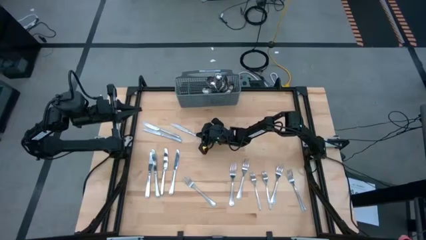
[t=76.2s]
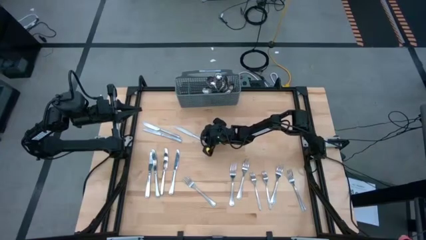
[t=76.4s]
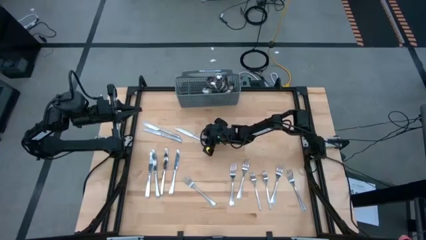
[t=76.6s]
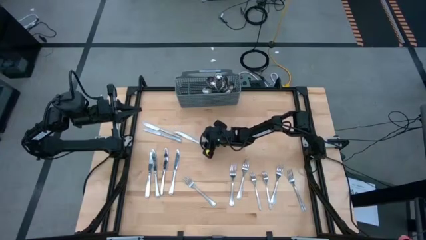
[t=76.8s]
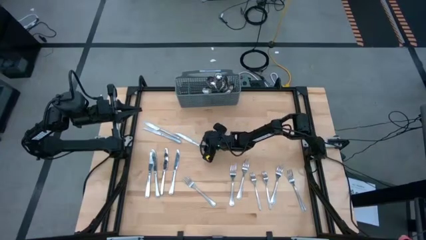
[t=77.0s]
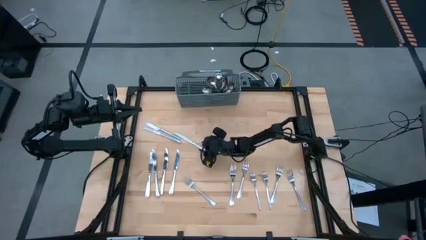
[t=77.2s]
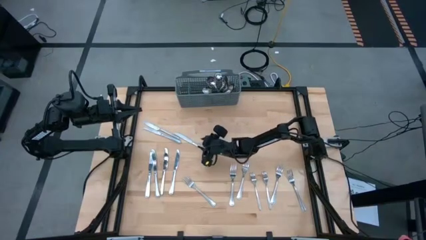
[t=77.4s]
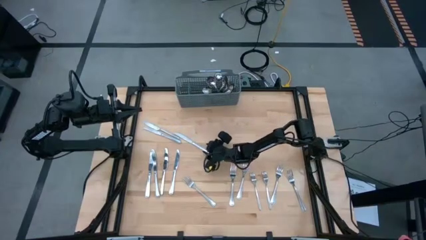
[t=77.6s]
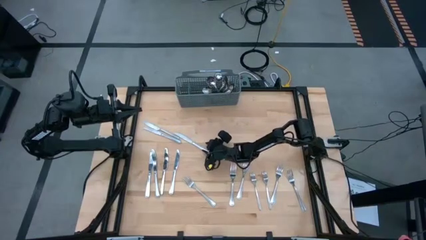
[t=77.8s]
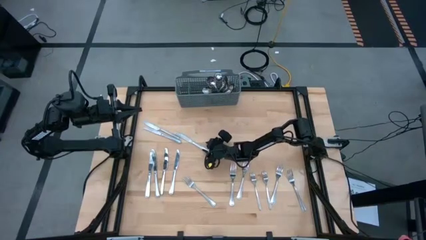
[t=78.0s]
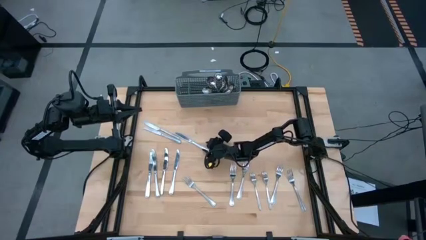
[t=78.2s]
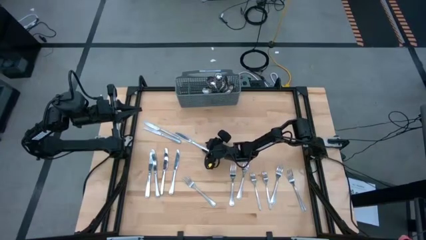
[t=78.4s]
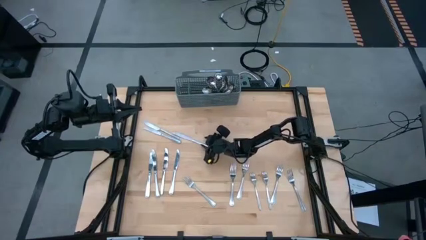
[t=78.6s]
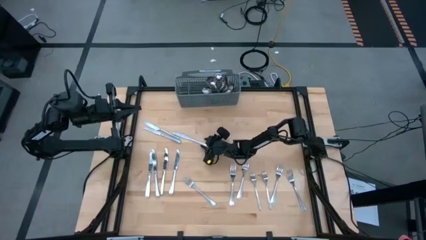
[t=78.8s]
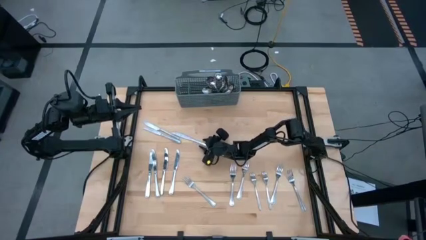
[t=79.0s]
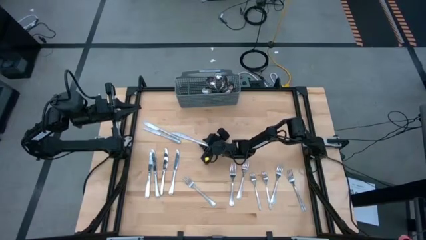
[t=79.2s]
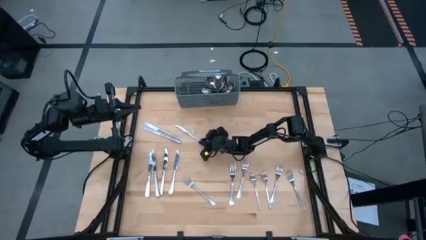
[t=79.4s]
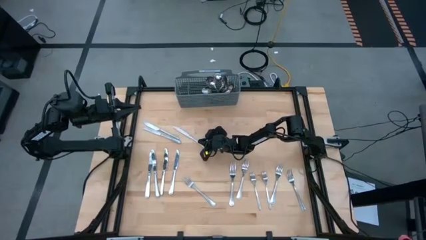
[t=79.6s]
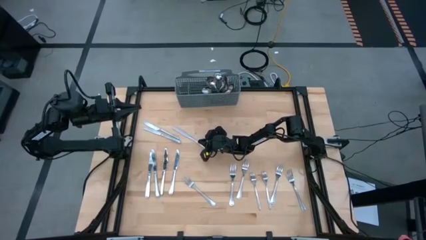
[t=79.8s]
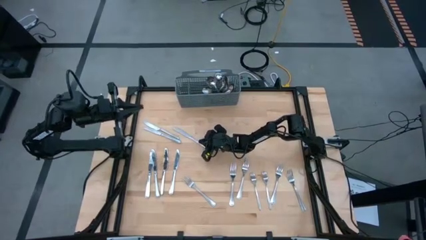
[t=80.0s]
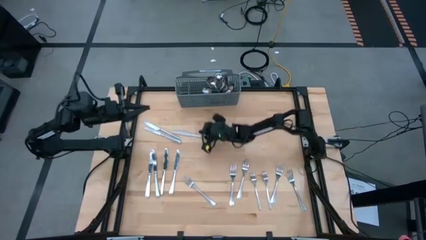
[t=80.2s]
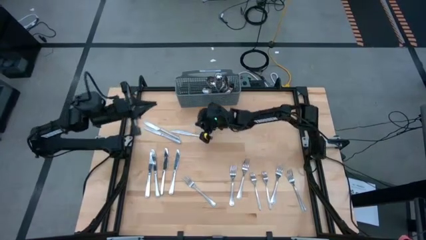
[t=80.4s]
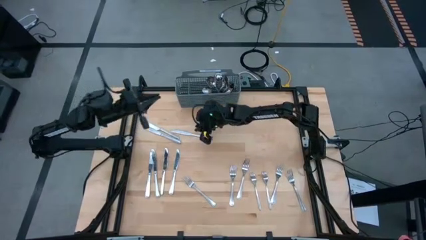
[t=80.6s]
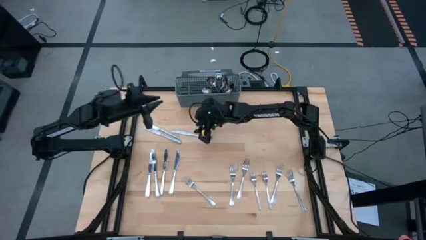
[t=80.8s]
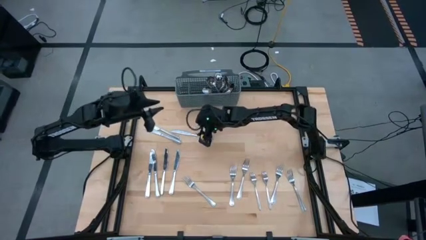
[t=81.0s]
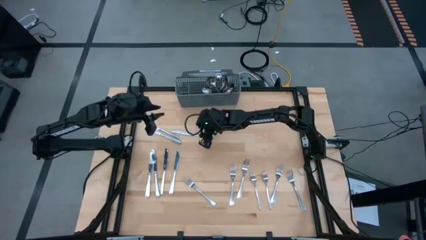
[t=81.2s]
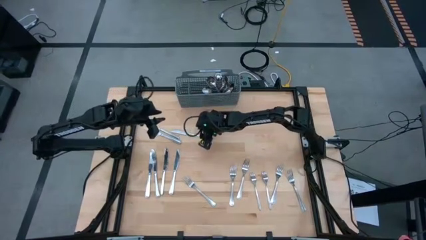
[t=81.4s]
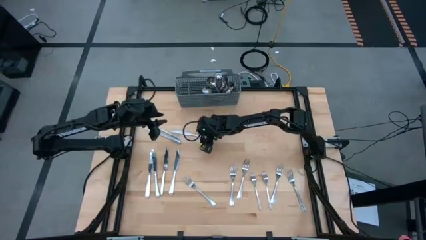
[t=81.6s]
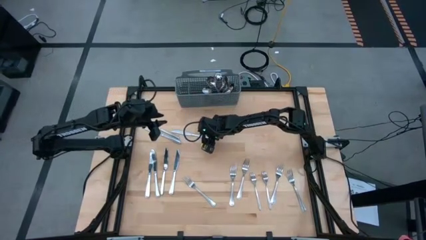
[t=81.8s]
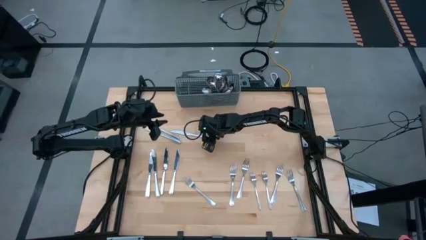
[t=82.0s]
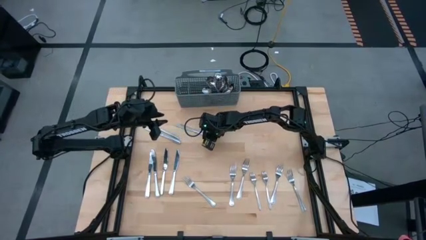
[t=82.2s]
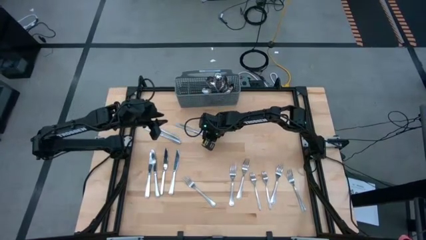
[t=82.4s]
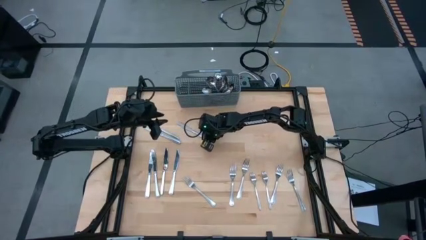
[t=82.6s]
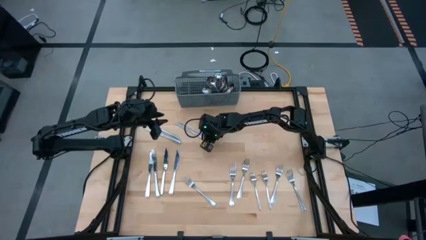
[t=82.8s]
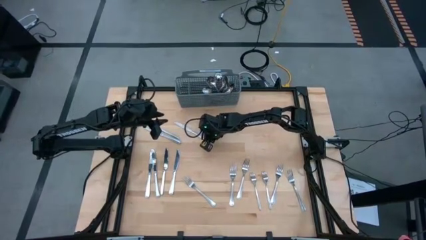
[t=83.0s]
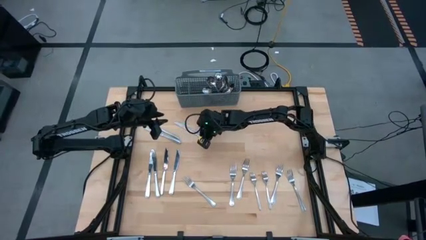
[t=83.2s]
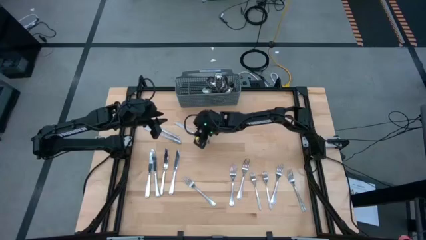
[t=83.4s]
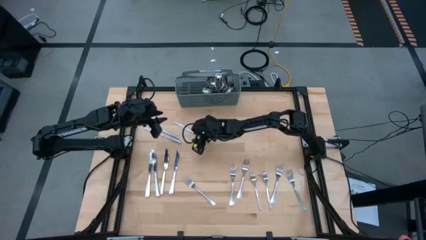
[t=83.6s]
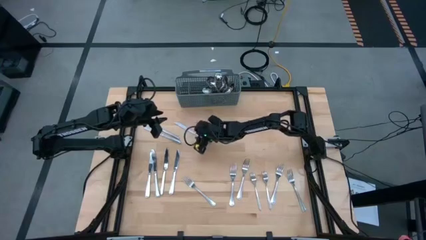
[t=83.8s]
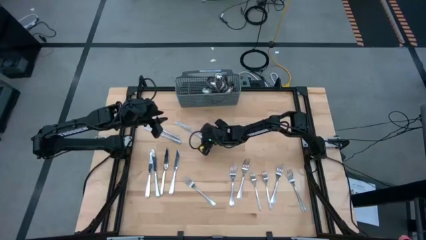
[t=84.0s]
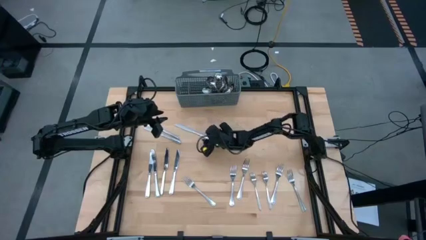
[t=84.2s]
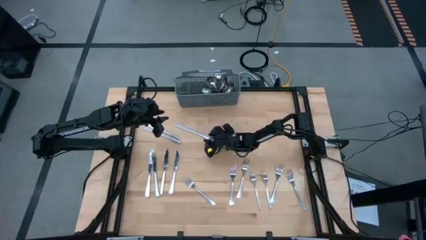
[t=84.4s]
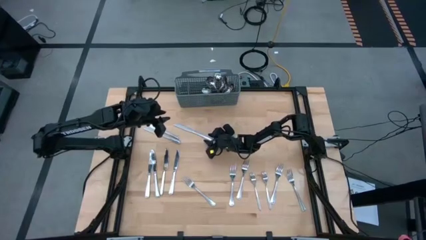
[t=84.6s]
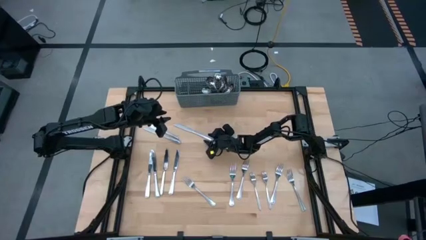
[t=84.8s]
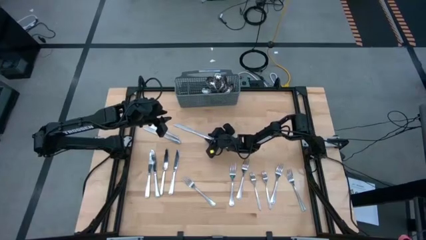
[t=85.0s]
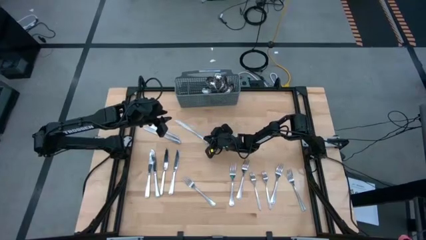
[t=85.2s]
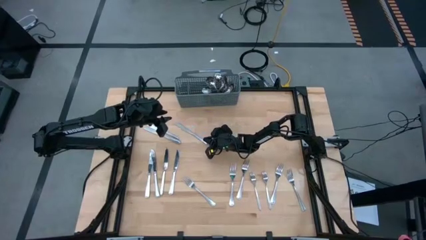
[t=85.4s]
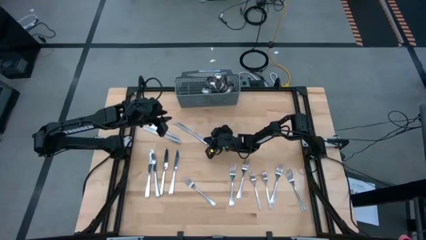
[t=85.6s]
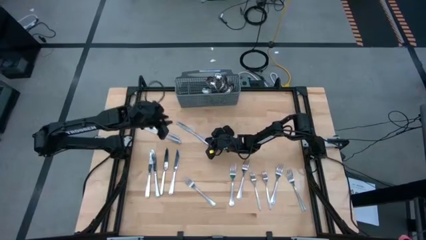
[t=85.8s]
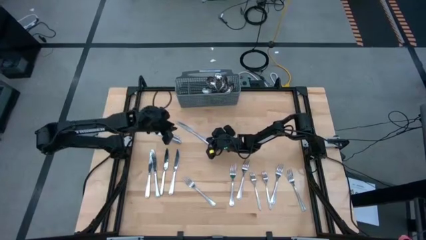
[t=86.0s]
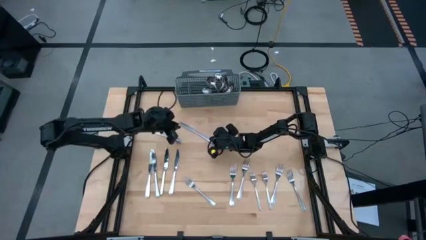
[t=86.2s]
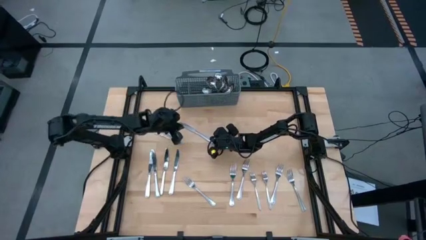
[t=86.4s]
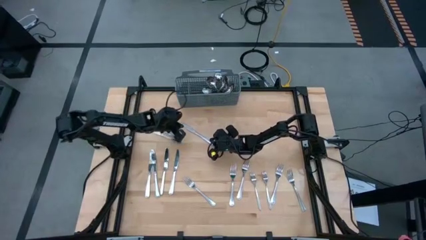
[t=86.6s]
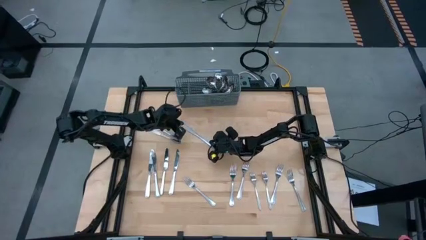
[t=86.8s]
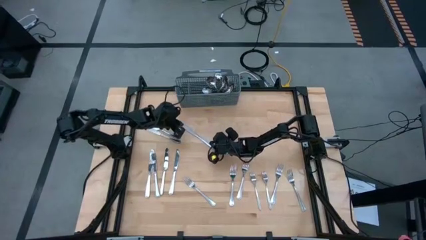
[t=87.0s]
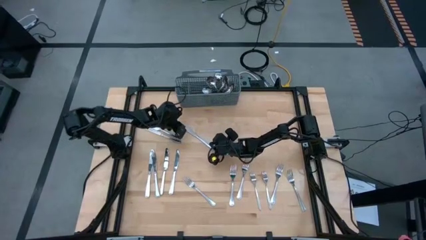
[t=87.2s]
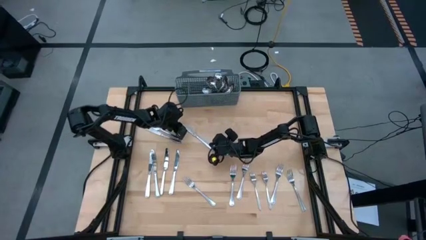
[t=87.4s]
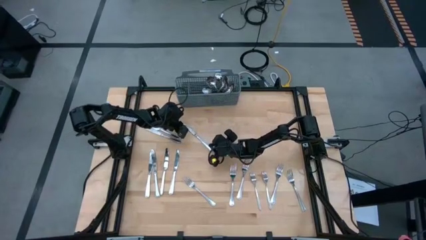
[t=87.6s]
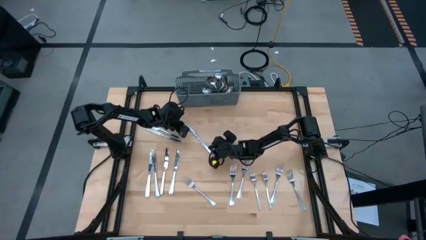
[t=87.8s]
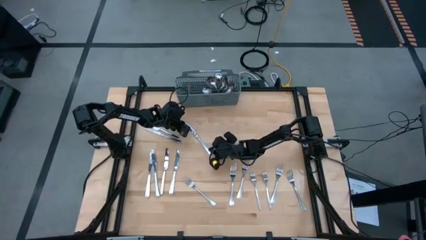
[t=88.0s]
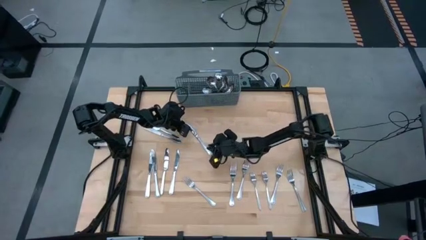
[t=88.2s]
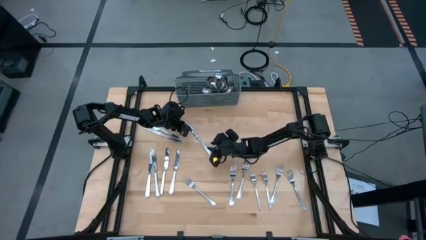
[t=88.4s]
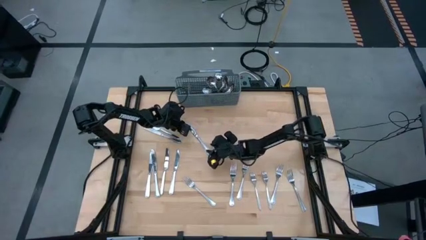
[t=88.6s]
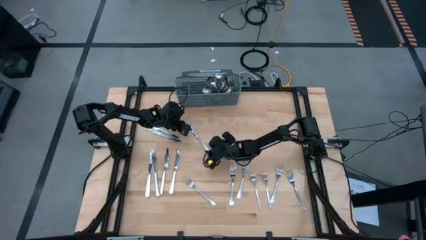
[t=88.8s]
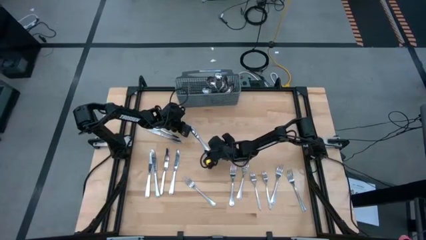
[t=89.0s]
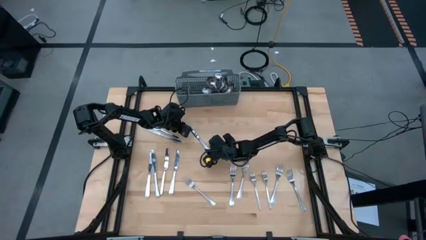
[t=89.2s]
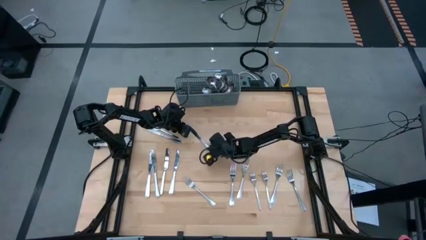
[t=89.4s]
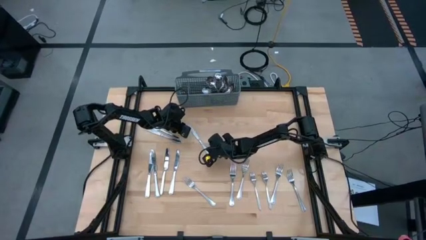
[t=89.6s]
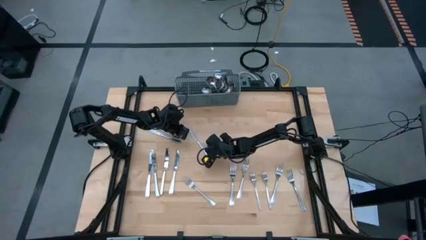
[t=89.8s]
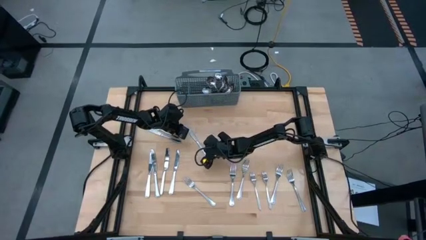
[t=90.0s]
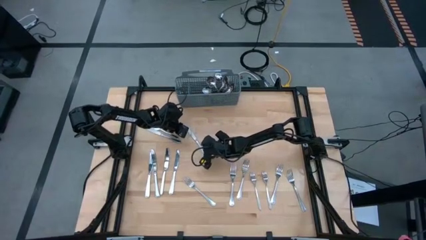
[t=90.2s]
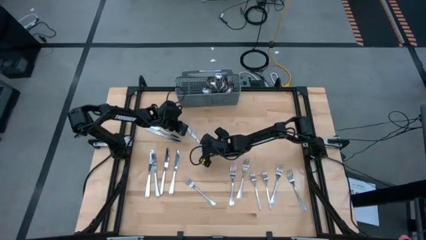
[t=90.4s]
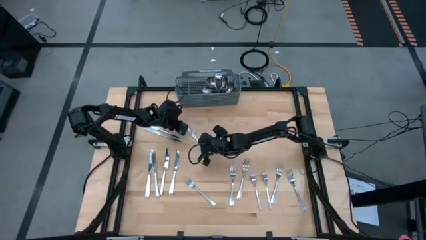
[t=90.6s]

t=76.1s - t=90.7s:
Task: Sort silverware
Put the silver knife into the gray utensil holder

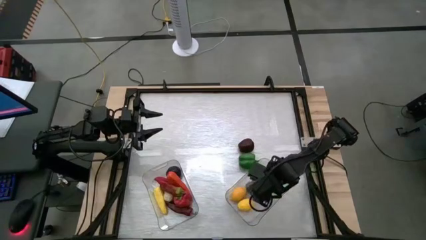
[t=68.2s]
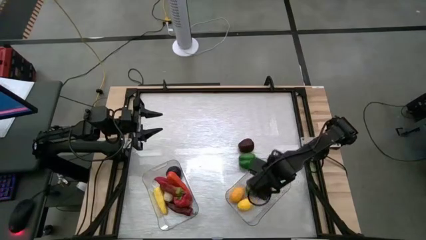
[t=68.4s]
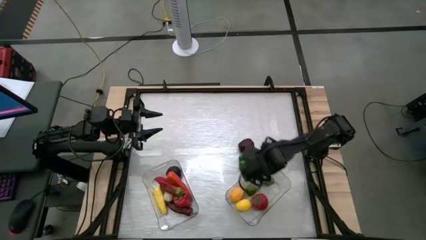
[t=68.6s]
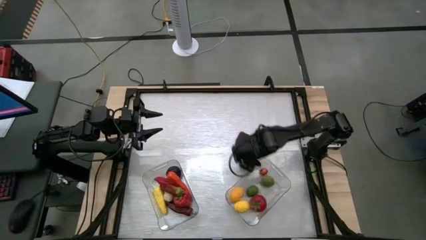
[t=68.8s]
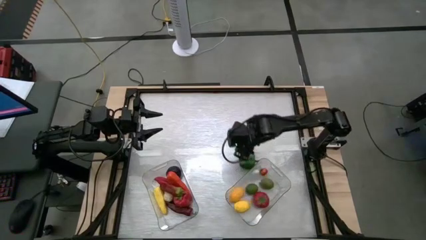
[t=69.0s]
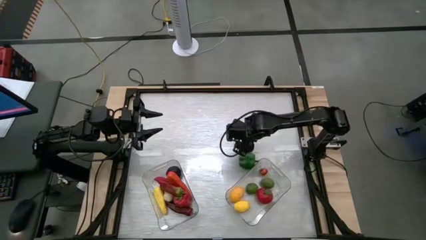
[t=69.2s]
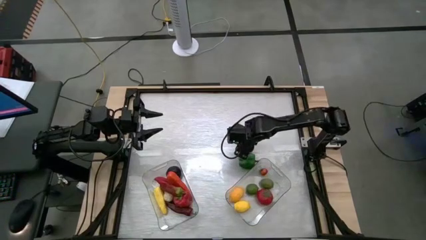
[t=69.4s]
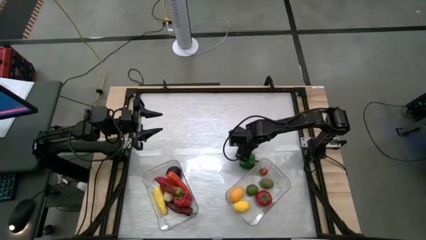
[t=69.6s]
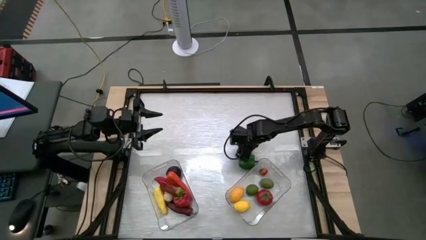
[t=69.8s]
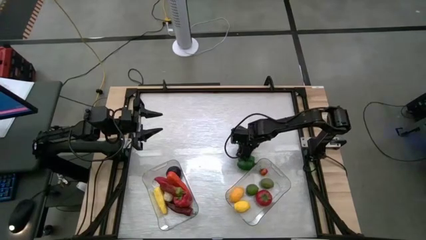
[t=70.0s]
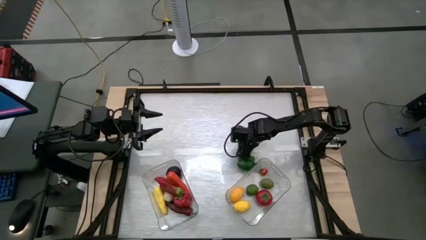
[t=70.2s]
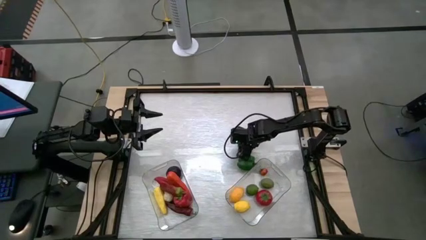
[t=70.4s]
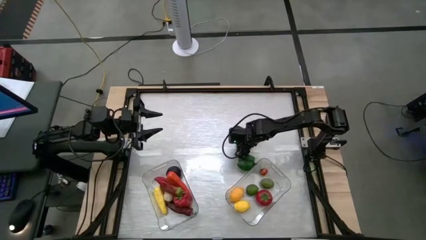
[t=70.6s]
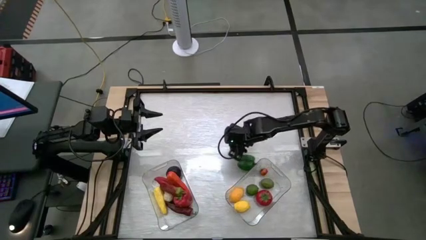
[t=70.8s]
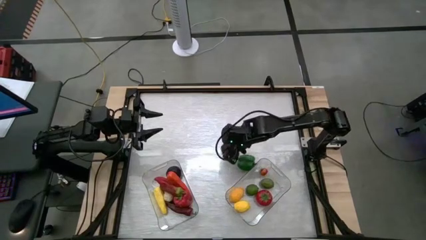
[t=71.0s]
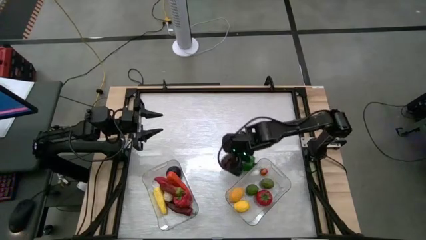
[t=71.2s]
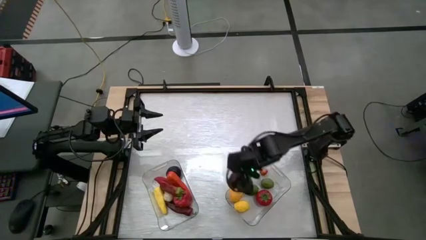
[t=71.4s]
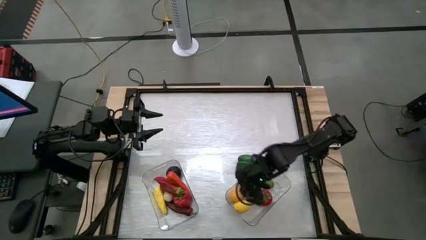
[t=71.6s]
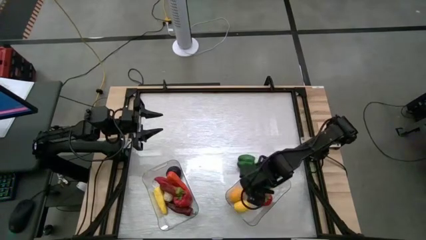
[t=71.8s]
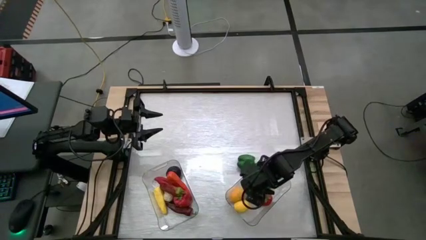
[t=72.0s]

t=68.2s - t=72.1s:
Task: Sort produce into baskets
Put the apple into the right transparent bin
